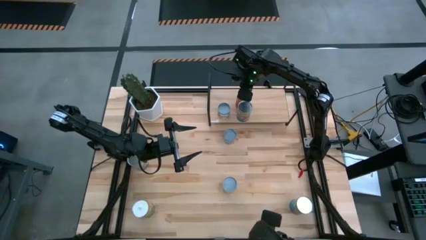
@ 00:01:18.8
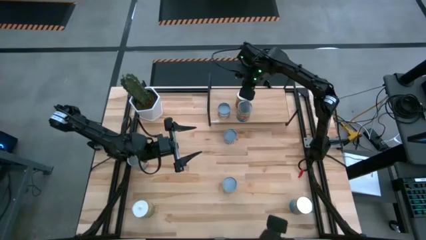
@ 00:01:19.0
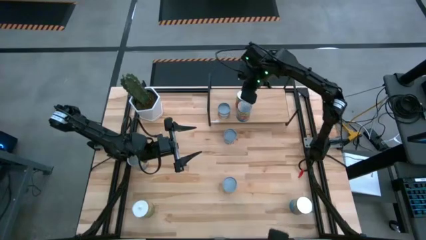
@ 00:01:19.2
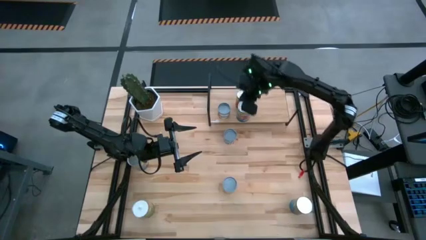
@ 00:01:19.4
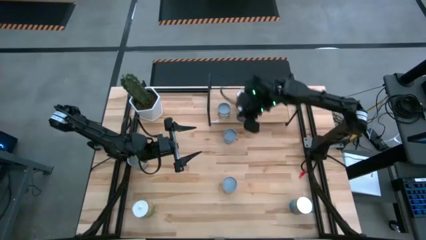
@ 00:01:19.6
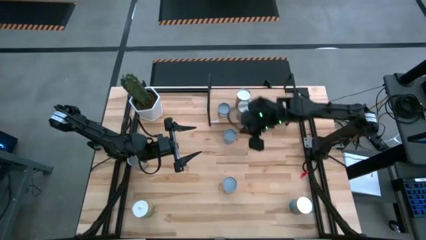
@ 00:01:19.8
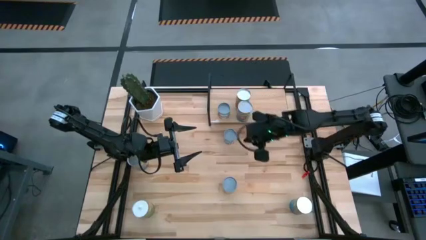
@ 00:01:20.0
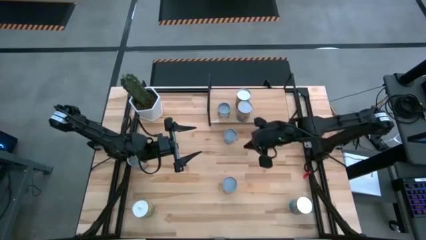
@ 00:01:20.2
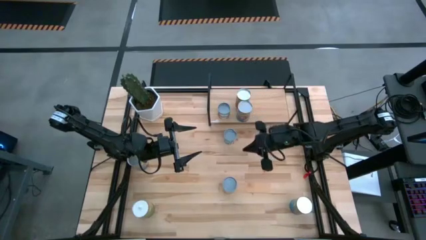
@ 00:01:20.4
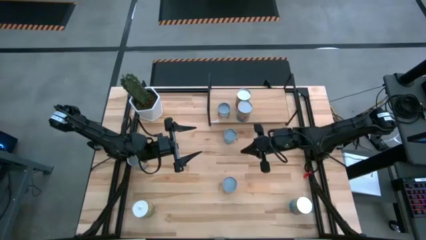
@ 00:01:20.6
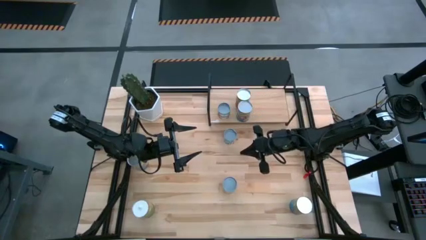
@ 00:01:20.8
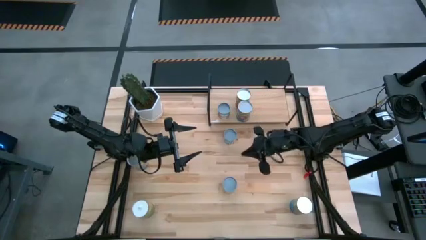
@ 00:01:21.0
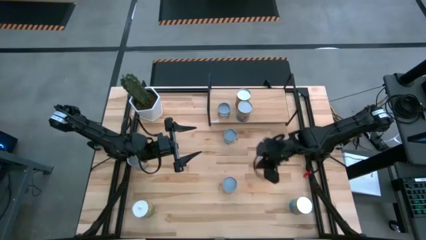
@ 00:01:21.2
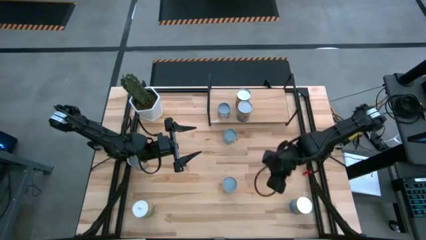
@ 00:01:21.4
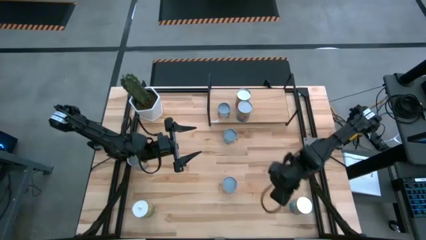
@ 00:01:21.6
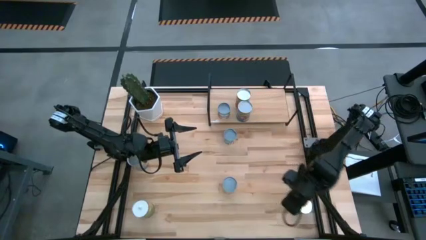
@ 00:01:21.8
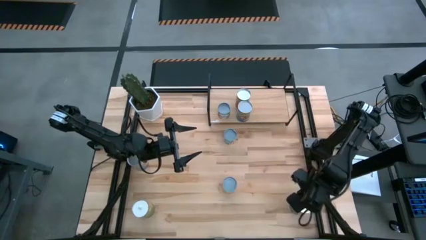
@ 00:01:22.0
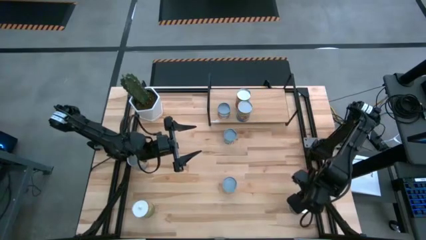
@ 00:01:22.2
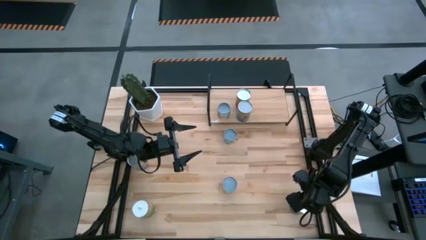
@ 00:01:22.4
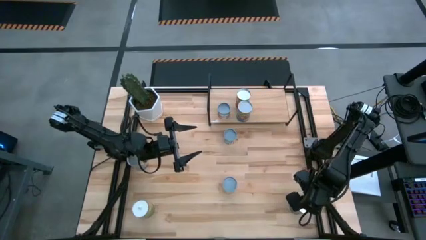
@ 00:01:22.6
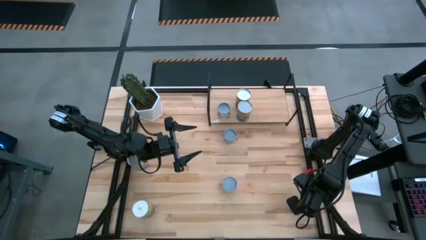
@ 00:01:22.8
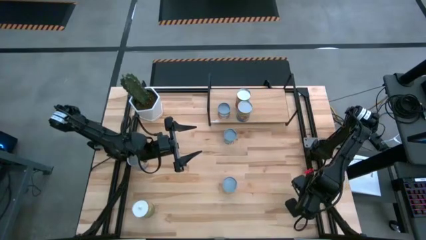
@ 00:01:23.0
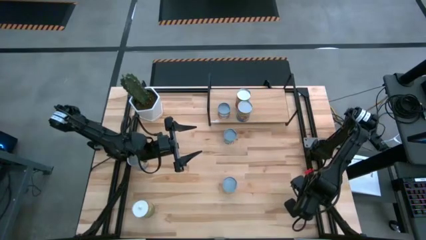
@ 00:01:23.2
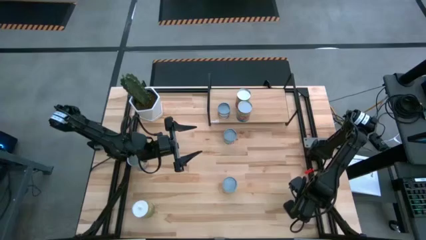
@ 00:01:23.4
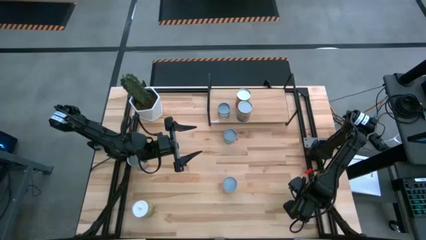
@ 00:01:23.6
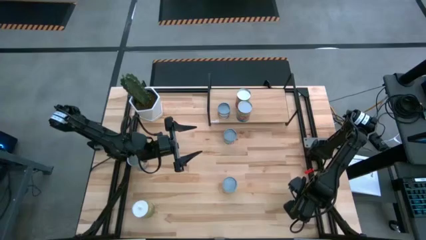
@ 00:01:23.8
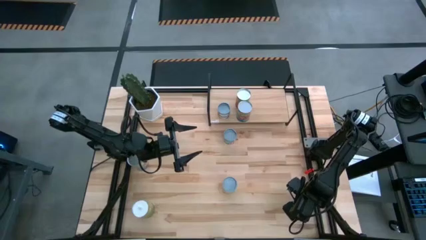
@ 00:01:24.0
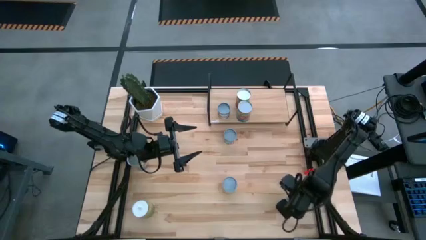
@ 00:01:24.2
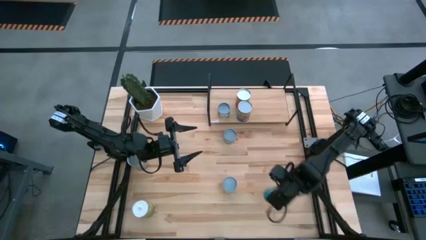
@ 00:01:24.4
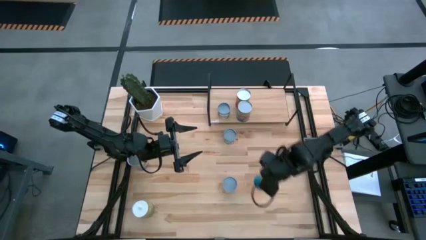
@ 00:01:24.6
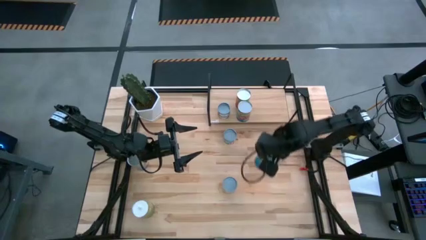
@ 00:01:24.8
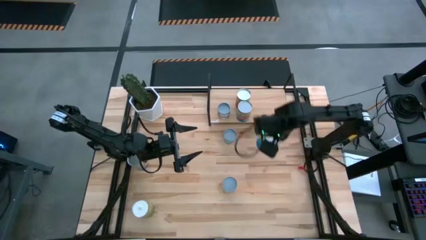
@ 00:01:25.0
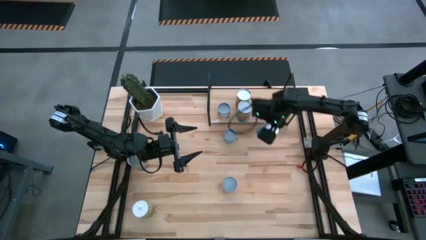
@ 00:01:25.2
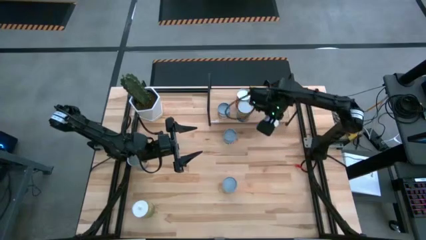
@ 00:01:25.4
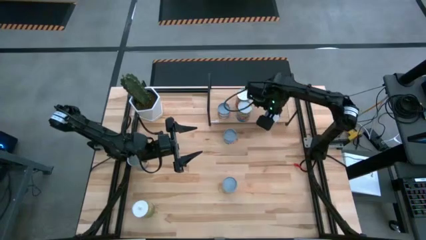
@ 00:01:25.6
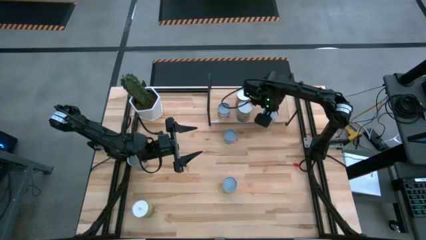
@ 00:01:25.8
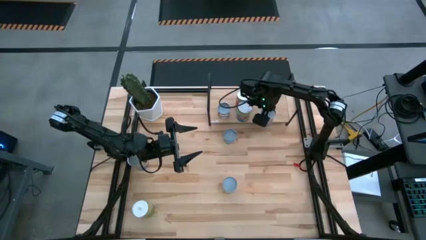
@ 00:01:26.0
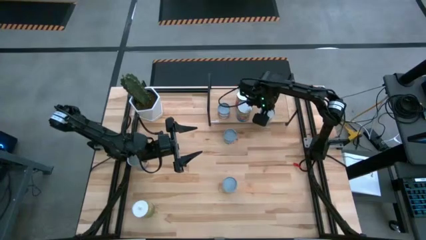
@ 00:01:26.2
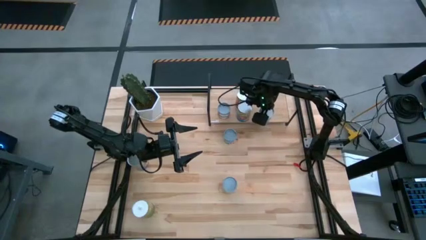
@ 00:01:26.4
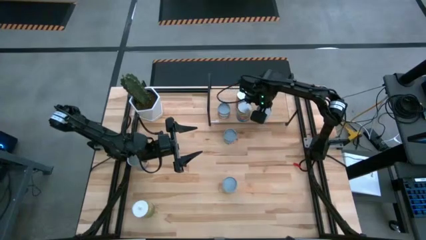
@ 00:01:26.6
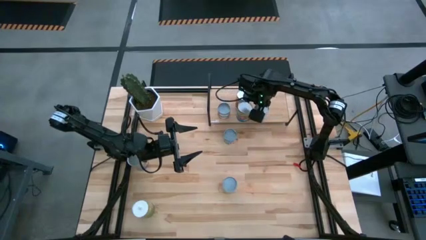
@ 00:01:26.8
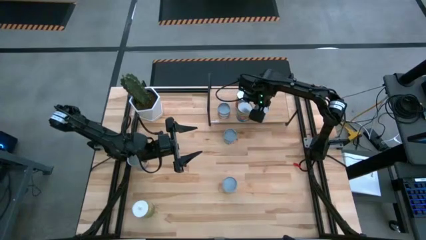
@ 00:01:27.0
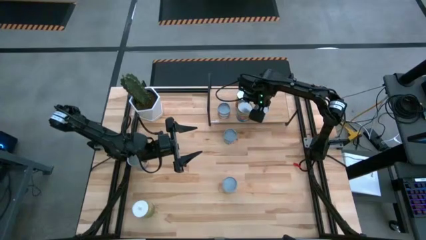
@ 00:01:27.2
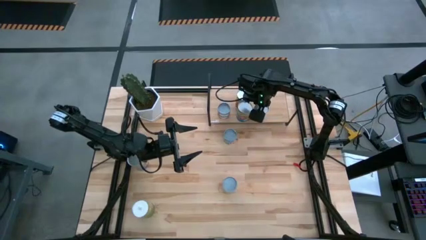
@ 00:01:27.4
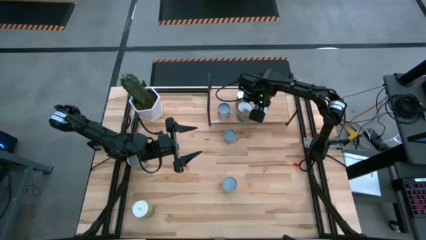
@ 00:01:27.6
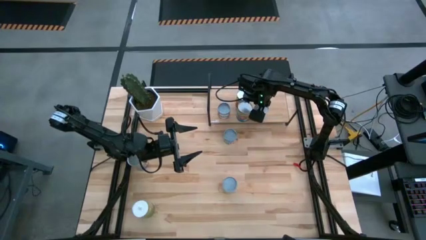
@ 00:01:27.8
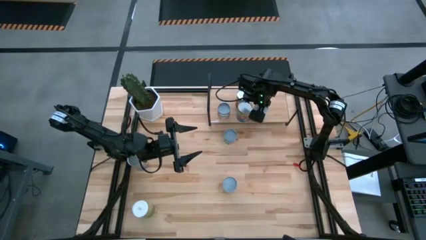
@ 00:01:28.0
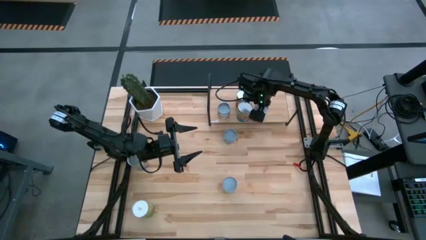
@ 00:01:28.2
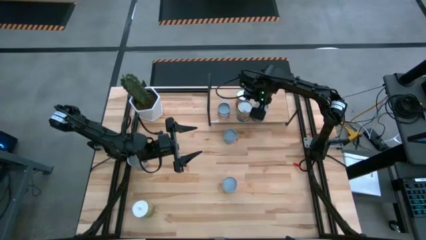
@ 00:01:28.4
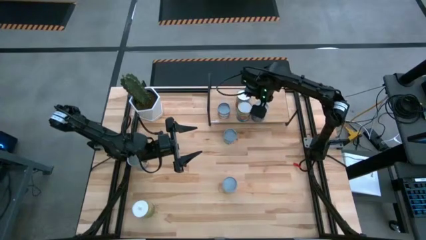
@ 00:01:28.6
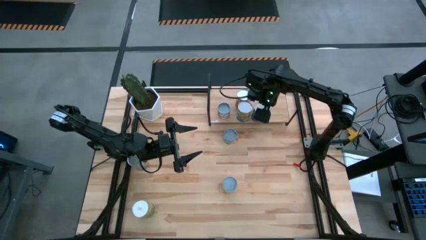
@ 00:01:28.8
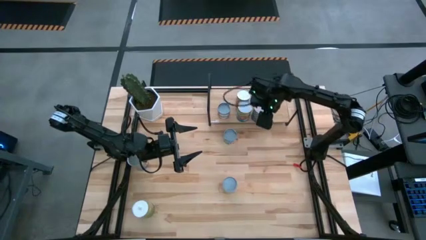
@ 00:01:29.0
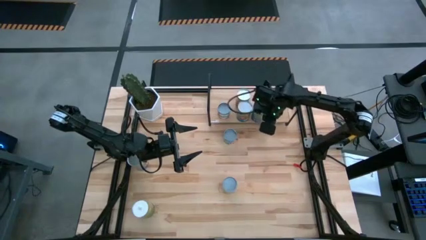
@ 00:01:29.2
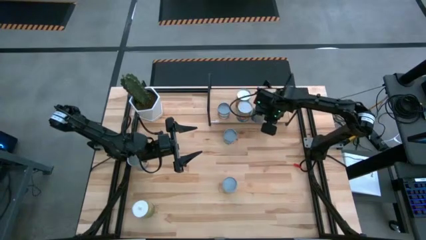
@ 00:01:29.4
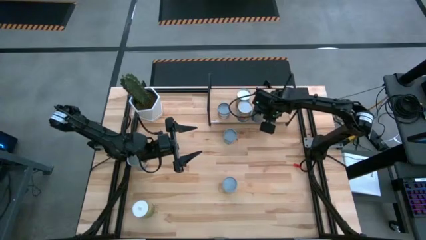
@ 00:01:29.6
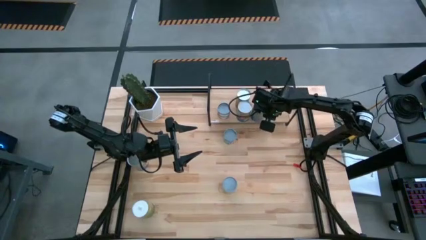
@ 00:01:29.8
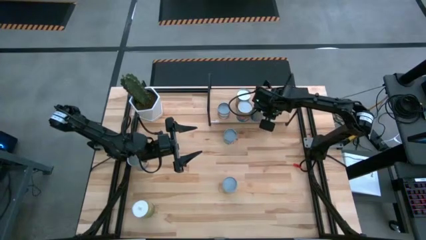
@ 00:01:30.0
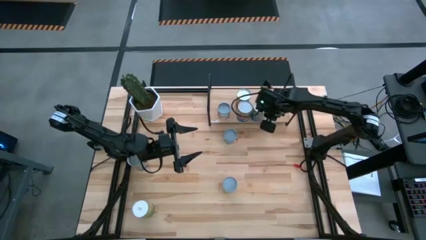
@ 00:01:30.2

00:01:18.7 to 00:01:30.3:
Task: Pick and place cans onto a shelf
Put the canned cherries on the shelf
